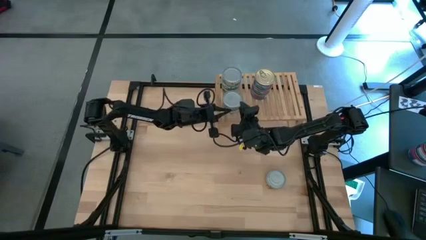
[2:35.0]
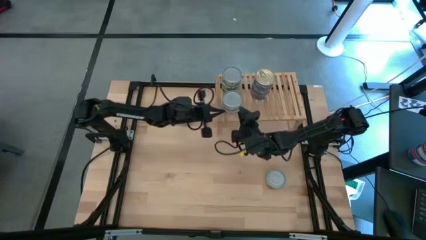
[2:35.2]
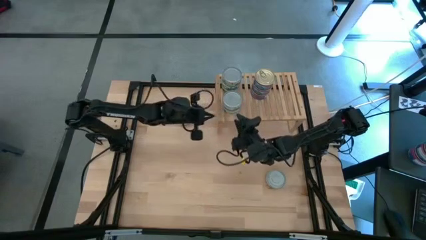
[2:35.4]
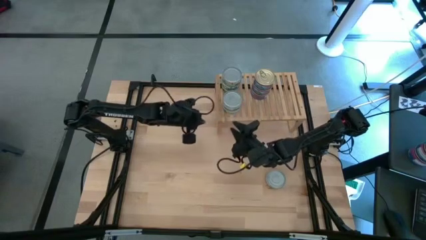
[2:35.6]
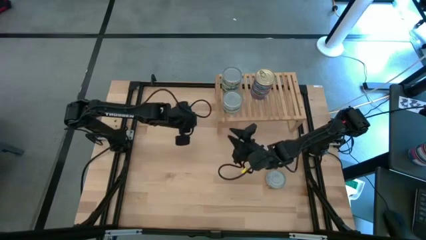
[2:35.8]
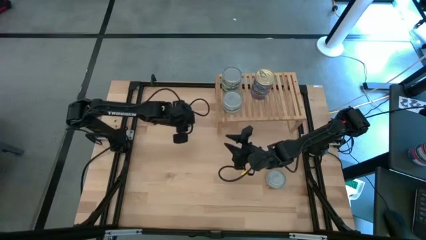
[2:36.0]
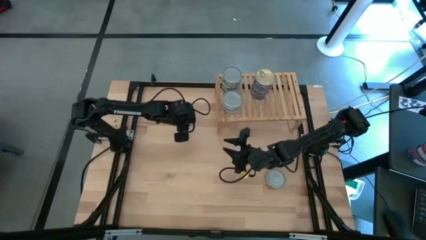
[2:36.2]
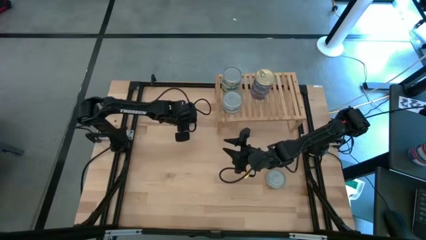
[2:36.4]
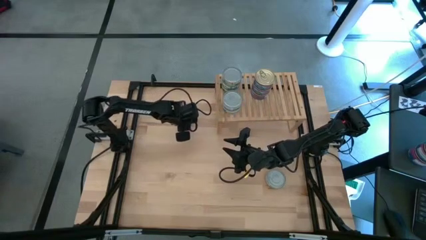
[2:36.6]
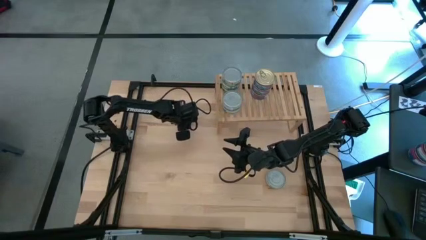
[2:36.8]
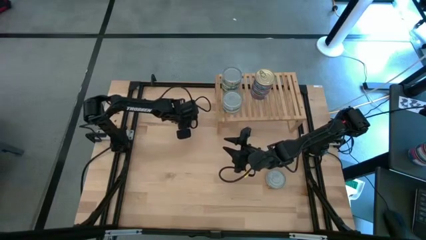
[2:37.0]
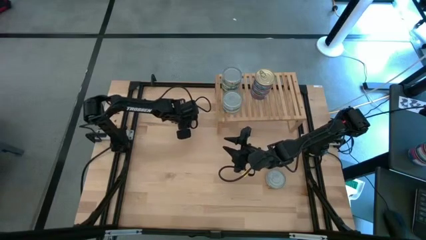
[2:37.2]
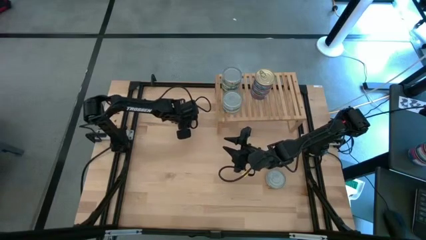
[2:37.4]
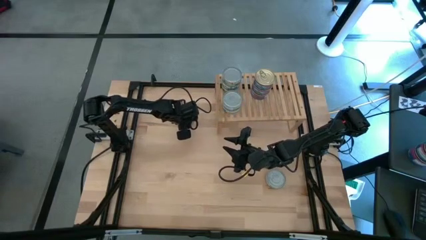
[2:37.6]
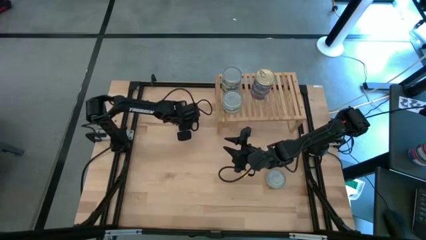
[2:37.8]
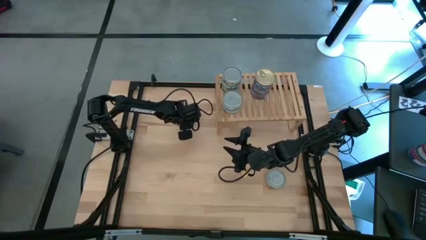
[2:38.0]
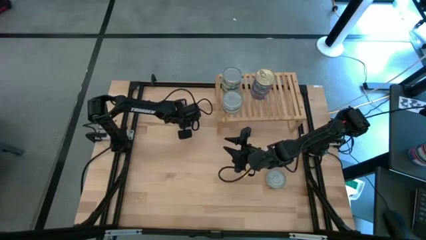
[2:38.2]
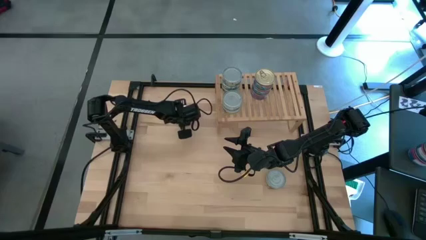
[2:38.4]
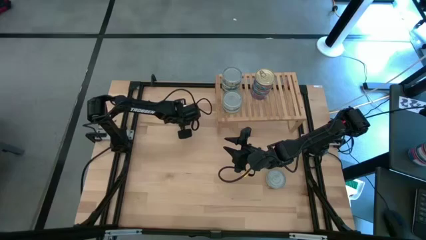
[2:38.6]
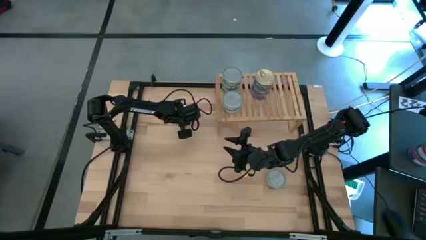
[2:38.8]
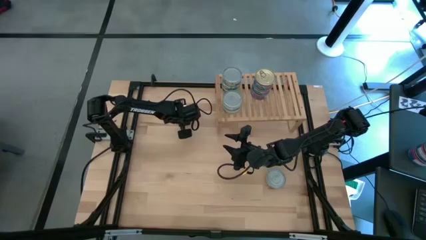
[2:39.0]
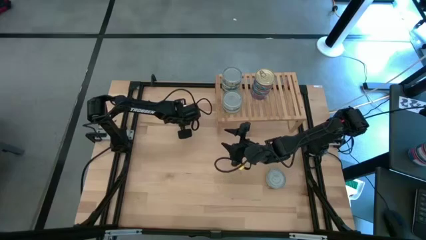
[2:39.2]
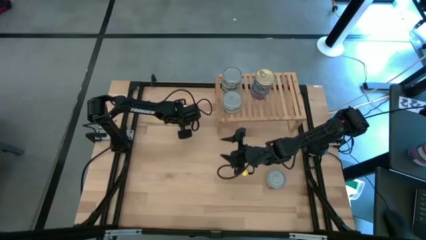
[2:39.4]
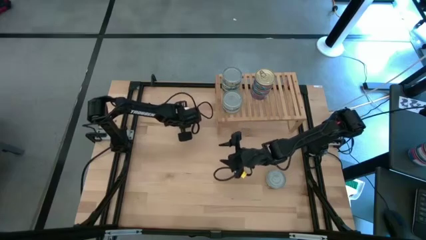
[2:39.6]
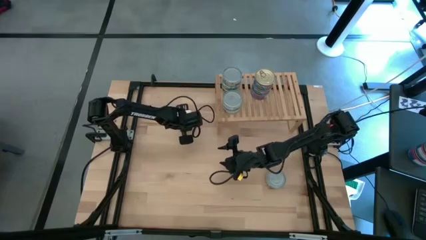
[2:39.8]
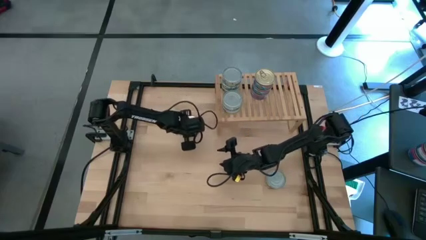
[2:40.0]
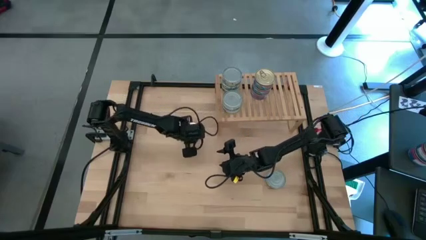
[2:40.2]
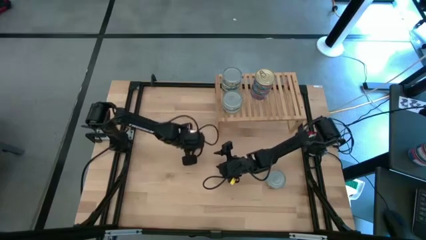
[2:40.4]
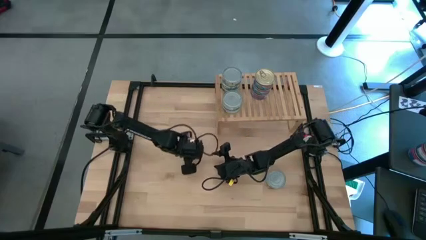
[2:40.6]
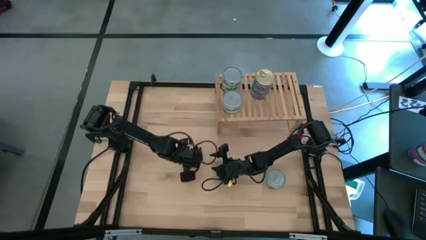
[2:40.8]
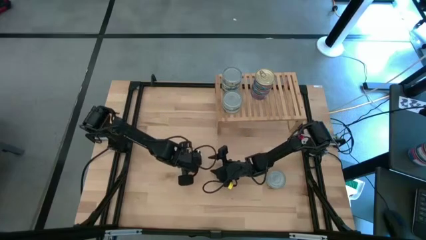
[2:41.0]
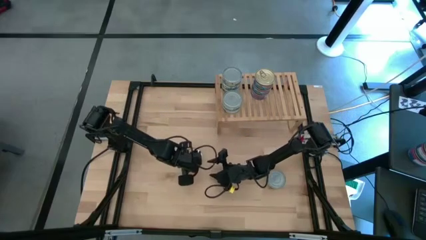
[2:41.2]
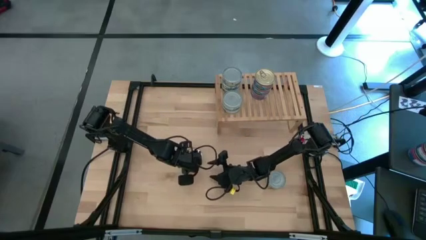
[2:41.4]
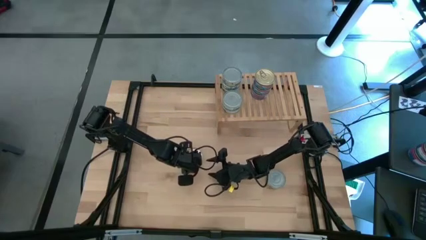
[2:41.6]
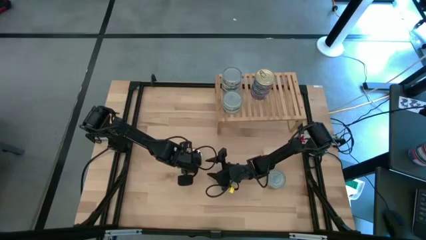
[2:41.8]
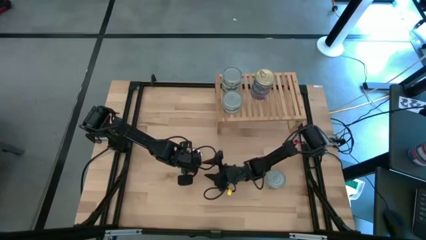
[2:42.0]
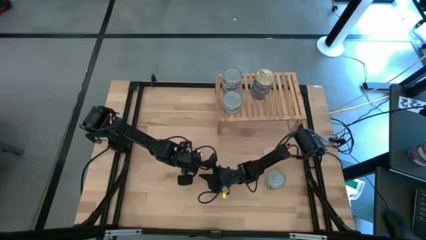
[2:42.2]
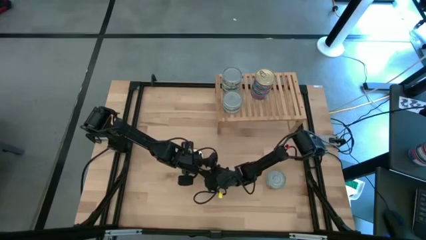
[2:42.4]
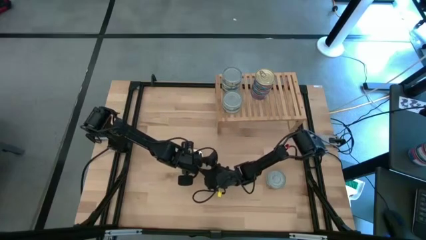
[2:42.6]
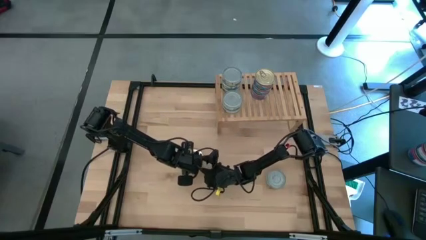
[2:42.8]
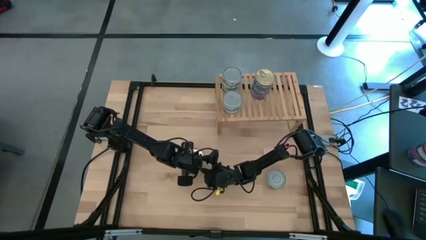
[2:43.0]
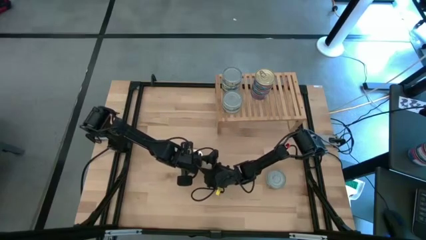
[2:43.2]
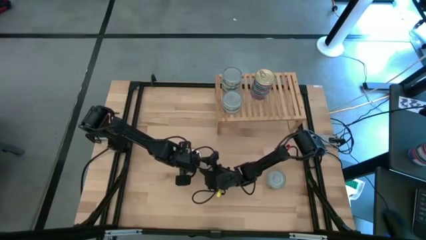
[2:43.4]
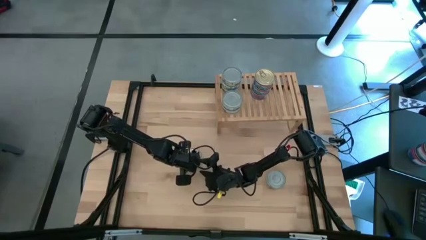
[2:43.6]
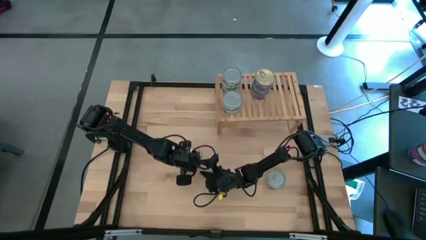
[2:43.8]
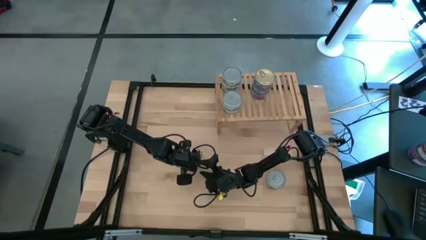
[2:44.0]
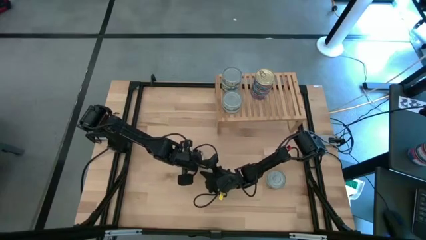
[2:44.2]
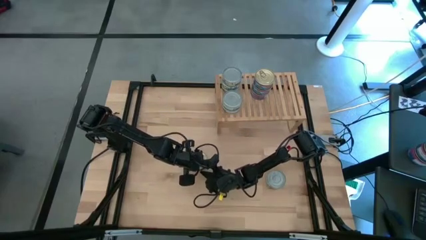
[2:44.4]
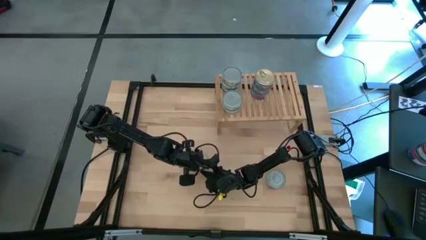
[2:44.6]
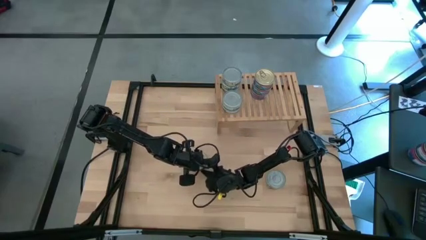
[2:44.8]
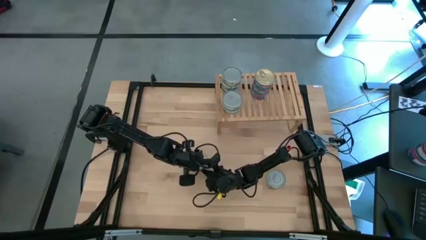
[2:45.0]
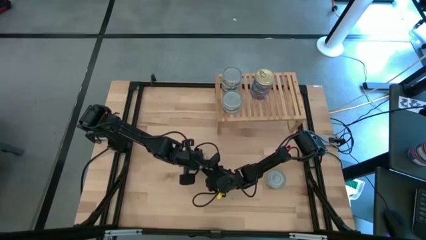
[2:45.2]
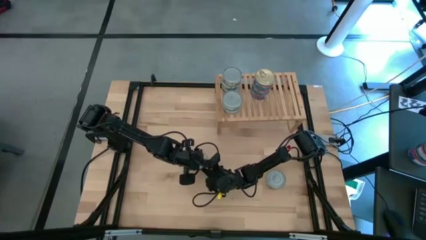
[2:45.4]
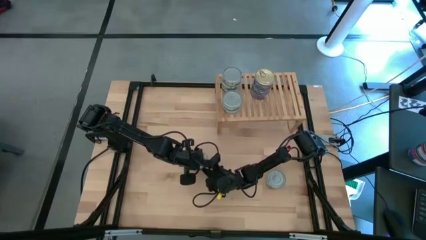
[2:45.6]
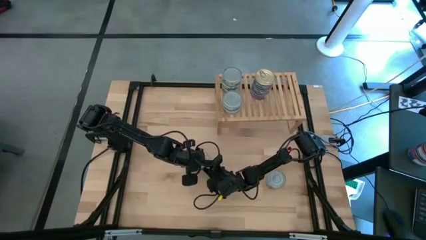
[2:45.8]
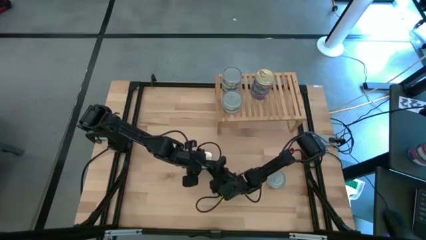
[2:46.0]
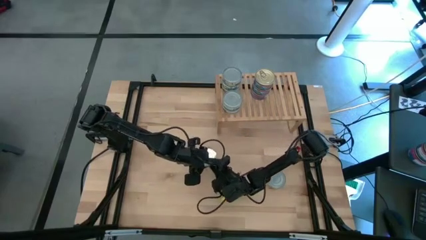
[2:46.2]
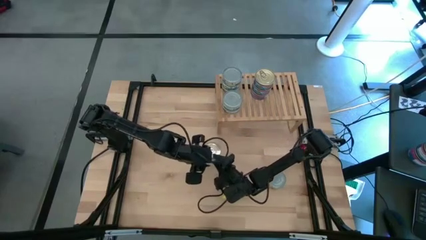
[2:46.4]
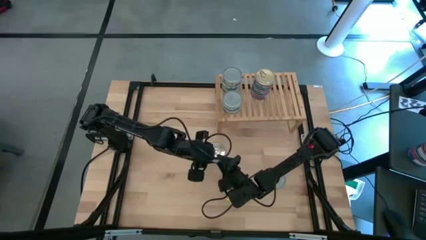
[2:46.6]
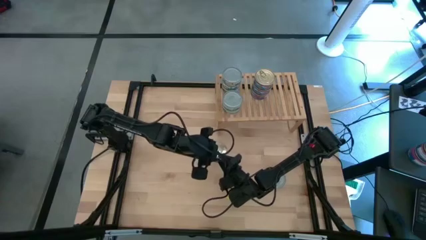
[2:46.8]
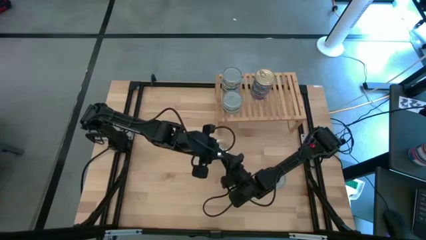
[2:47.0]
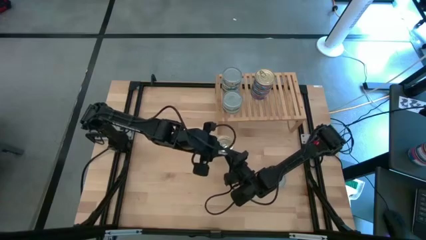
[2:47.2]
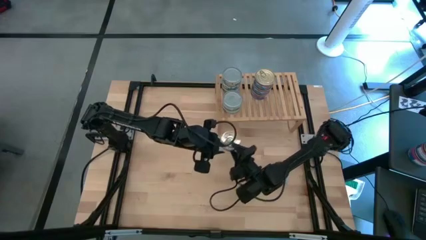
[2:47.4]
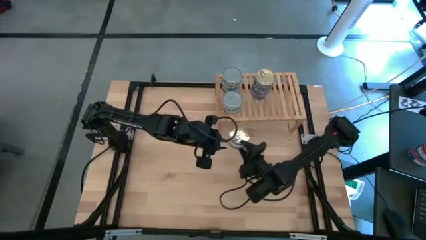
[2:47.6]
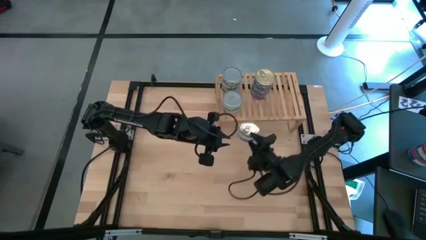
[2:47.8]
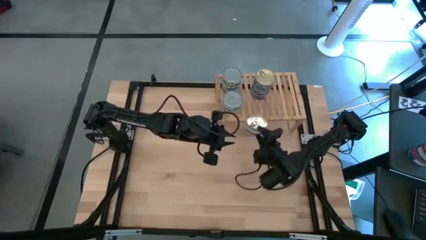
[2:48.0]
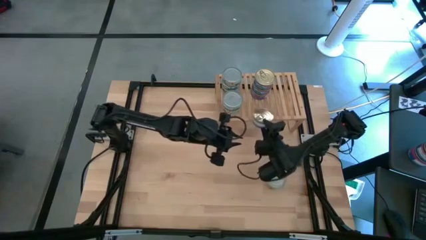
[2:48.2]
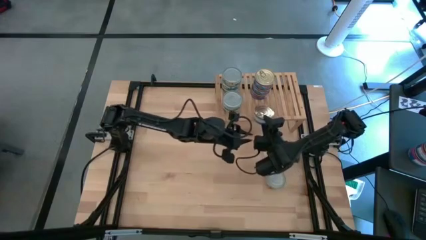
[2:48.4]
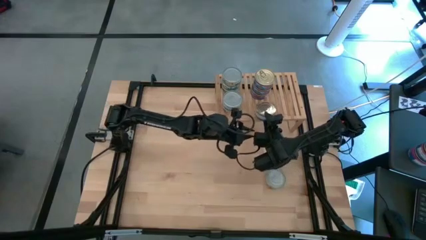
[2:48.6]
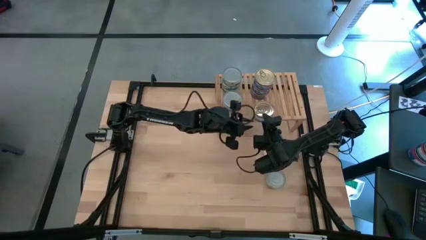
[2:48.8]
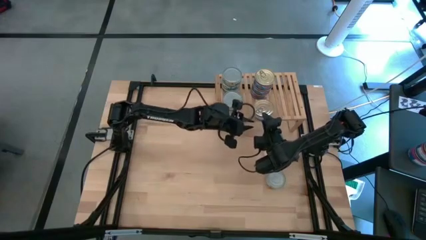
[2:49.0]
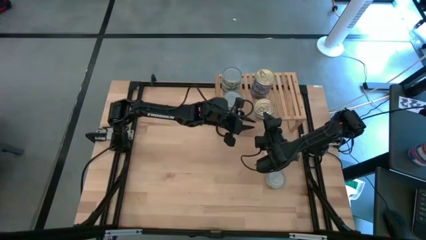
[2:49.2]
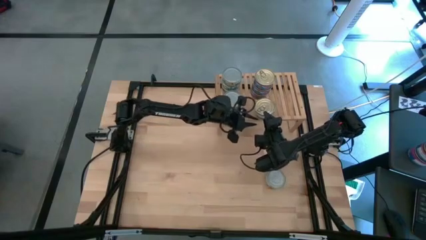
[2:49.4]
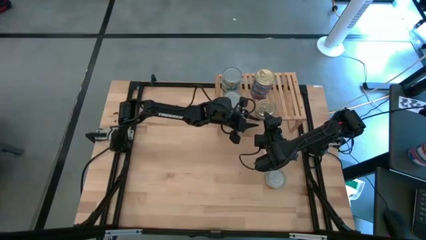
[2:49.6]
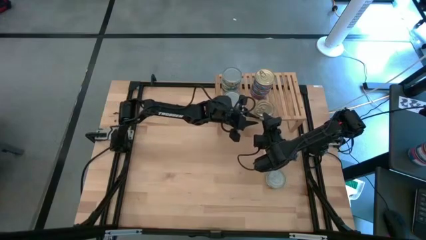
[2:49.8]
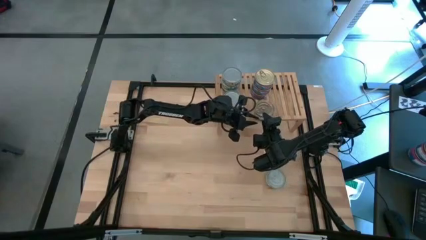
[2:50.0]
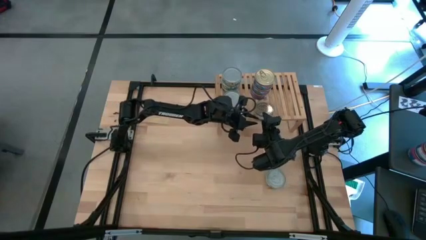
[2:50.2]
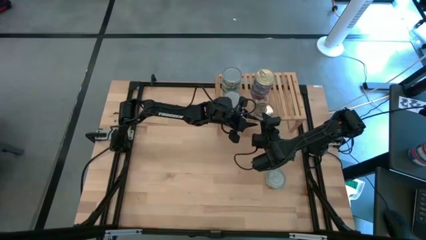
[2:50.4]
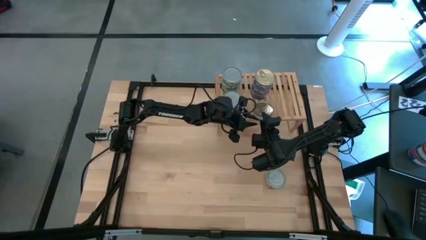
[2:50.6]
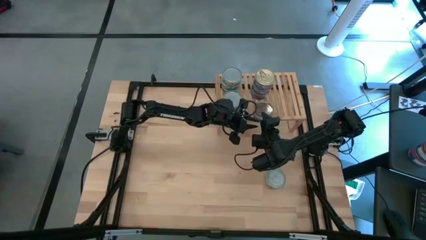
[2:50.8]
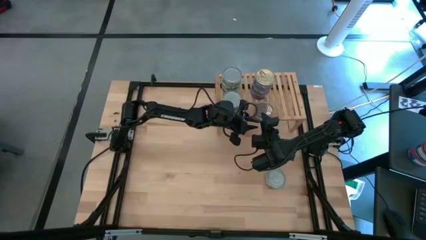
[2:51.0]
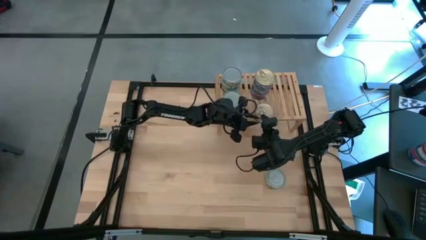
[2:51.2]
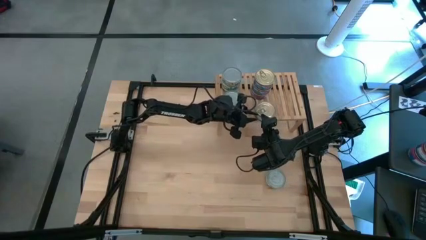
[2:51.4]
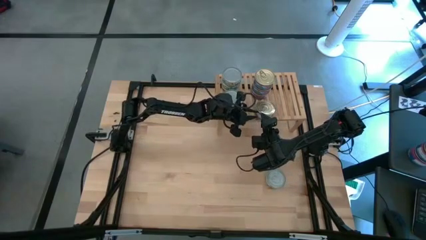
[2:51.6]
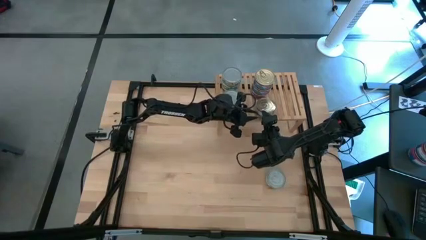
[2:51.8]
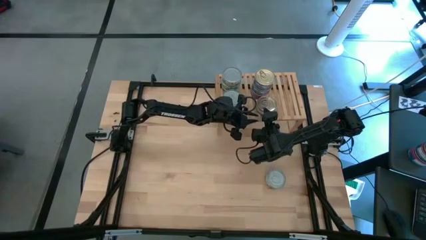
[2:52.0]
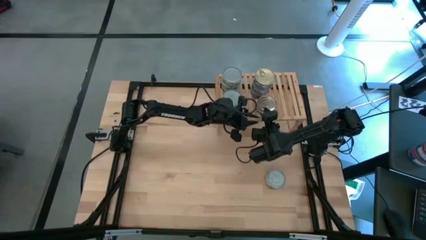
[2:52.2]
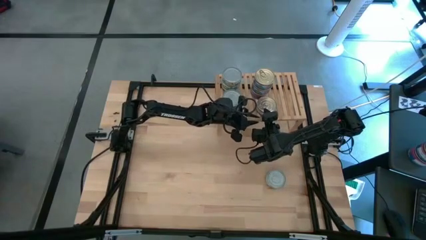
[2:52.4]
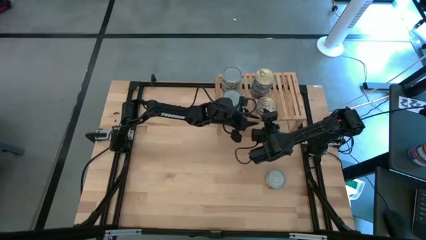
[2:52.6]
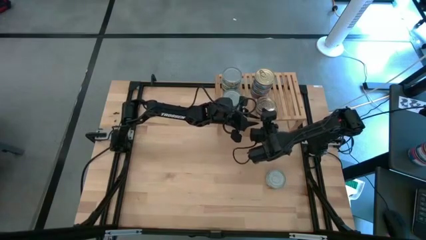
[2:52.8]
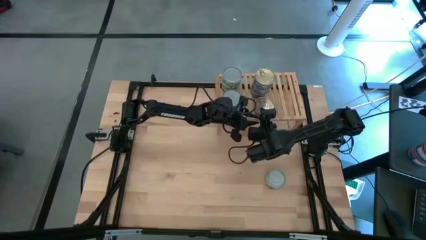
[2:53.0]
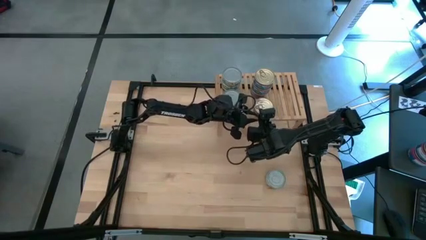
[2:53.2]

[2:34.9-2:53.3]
Task: Stack canned seafood by type on shelf
Put the blue pink tuna can on the shelf
